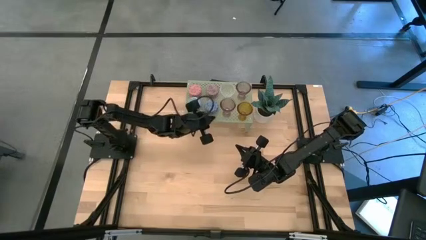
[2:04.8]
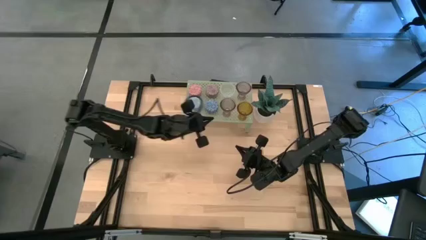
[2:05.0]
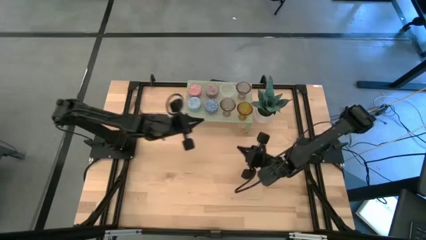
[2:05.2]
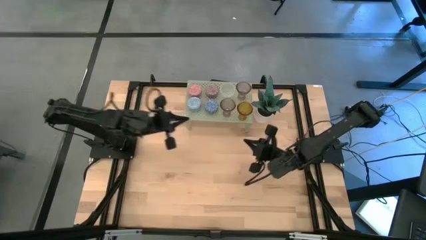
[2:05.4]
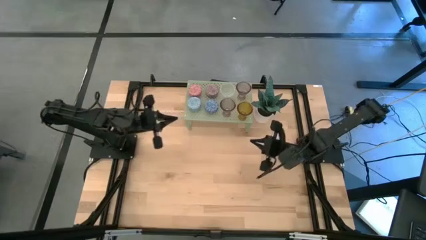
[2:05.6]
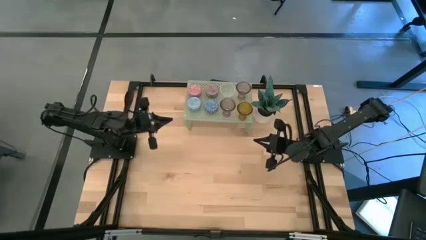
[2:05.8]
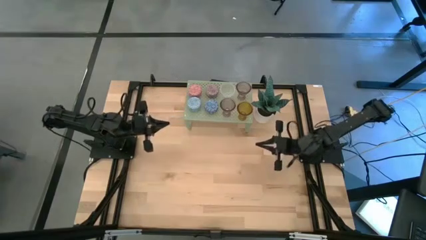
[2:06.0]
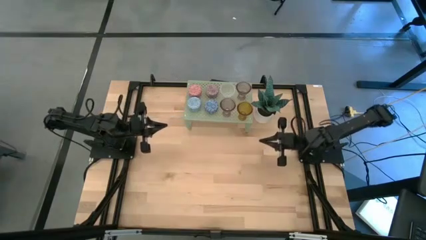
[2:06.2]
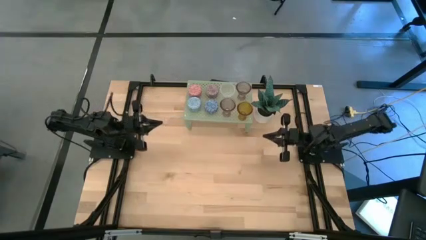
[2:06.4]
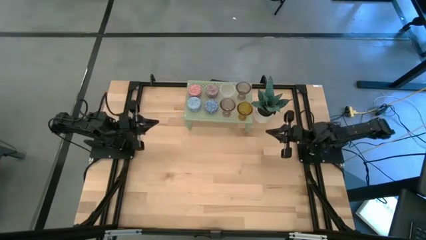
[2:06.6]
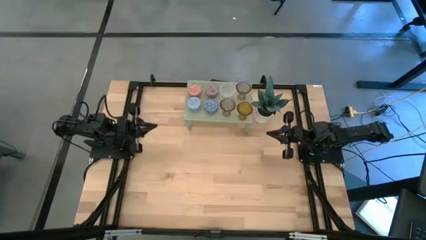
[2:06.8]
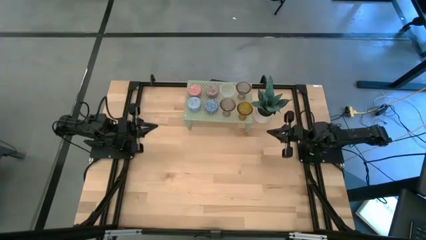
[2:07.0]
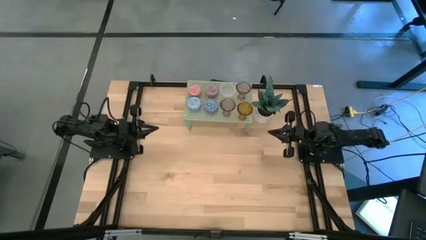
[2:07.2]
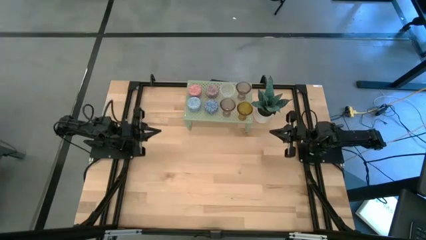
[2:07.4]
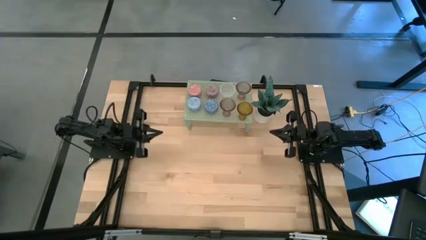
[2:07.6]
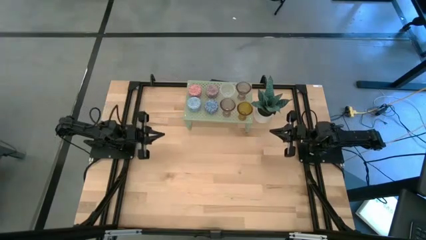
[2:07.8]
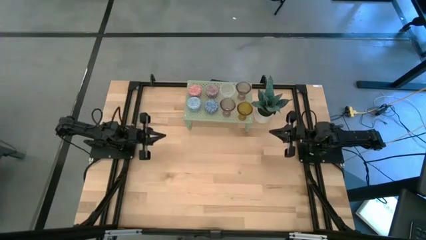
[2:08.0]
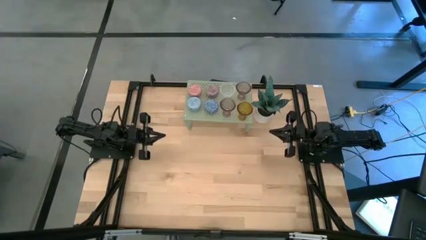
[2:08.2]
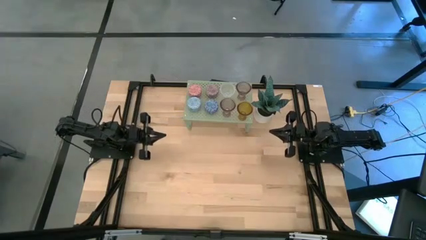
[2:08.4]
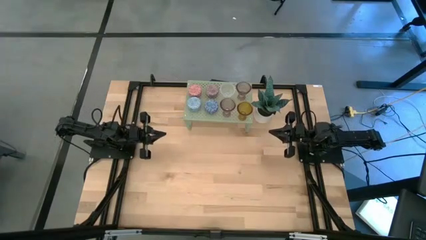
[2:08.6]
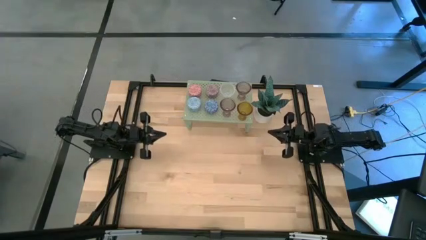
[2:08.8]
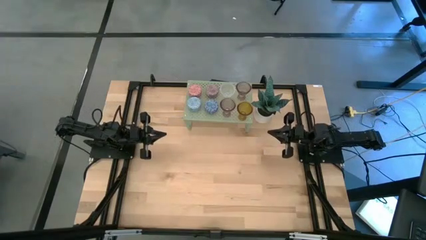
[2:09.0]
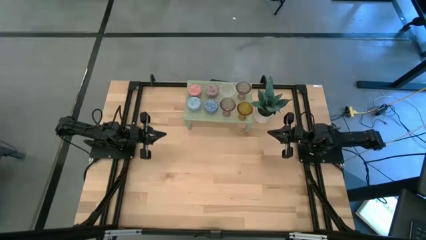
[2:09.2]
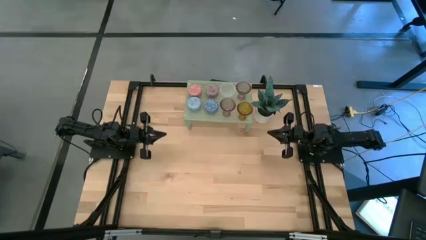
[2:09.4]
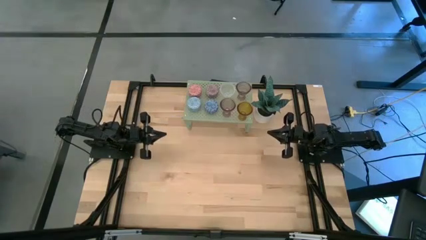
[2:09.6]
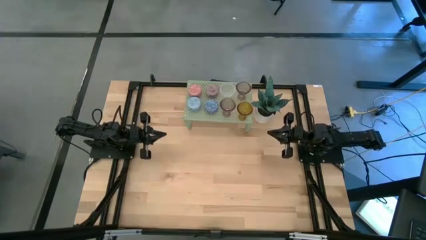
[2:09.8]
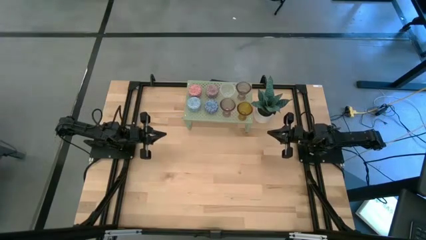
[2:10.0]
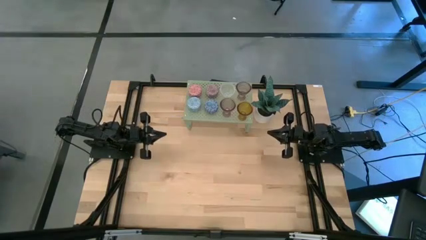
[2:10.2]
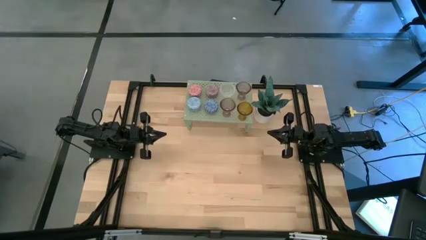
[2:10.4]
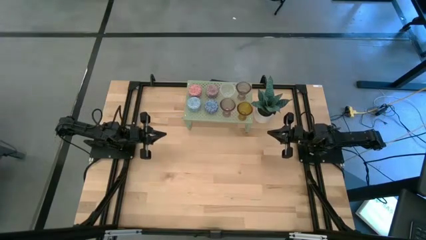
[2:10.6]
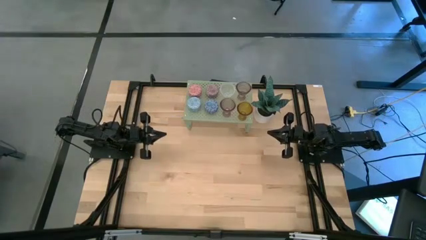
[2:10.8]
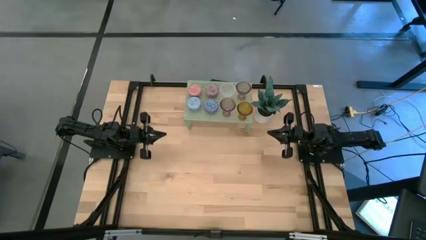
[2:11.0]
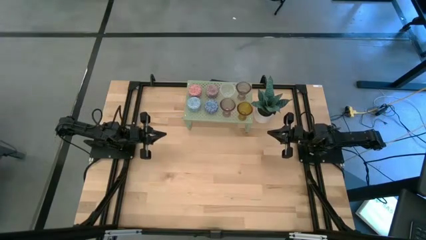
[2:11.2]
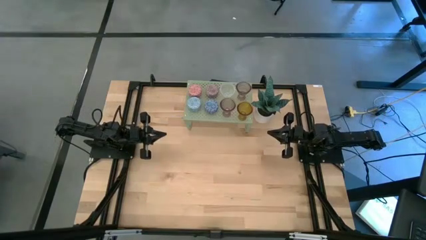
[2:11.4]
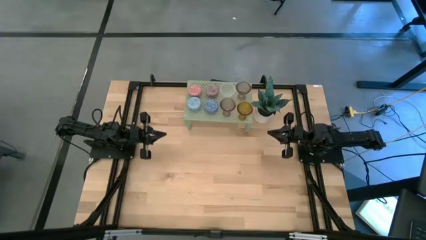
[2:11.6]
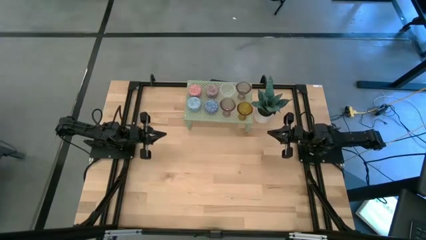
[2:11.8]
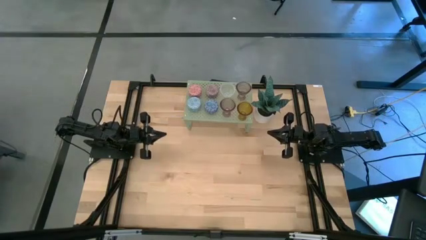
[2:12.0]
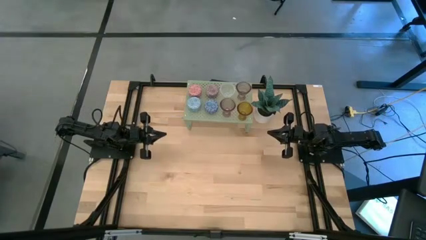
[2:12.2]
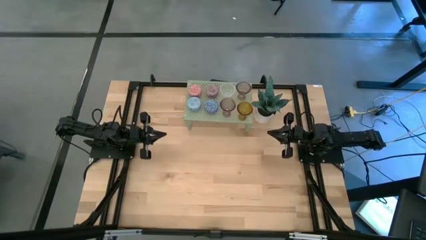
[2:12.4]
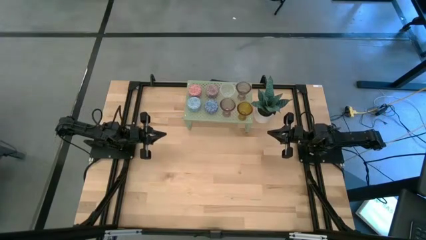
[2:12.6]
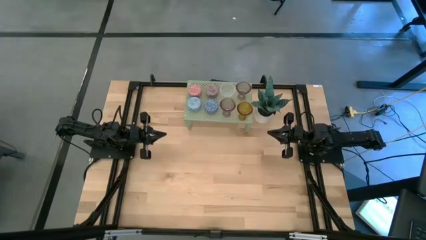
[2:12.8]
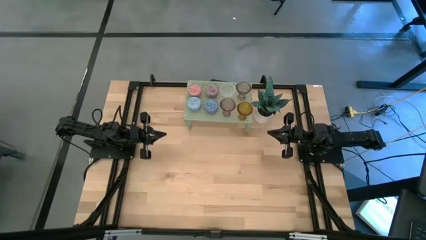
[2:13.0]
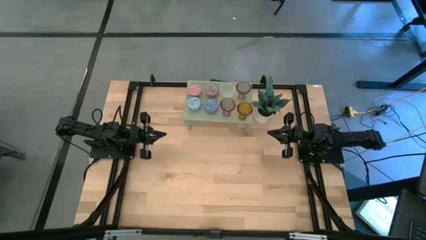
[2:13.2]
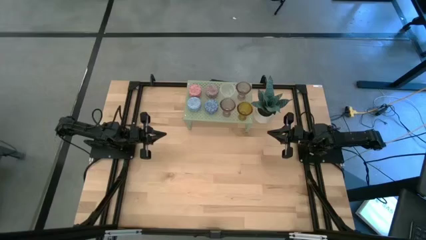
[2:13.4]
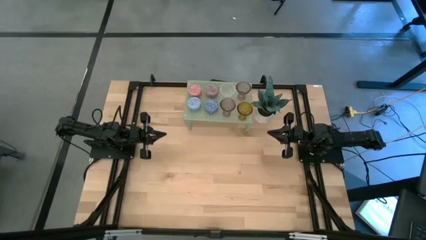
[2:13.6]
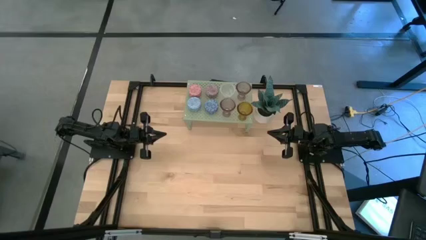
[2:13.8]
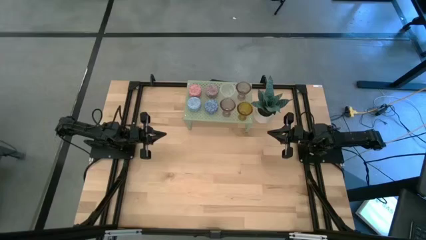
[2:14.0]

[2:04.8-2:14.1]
Task: Pick & Place candle stick holders
Return to Home Position

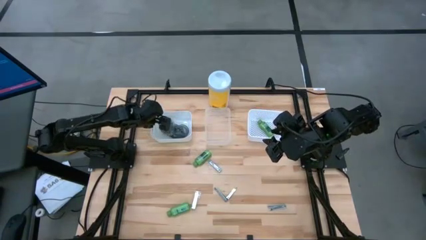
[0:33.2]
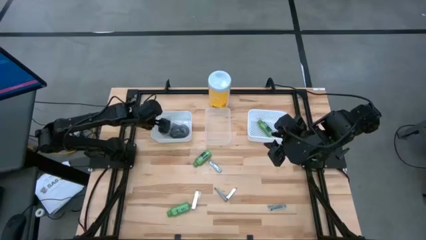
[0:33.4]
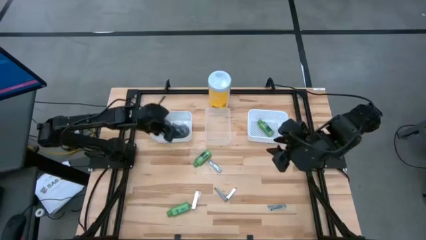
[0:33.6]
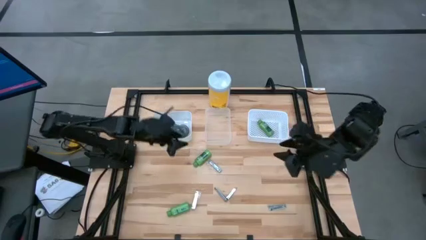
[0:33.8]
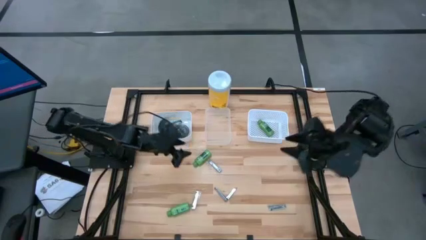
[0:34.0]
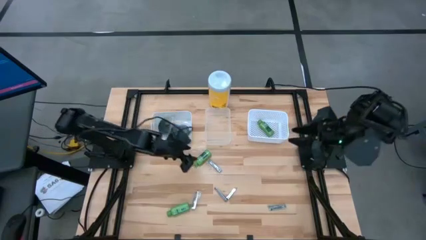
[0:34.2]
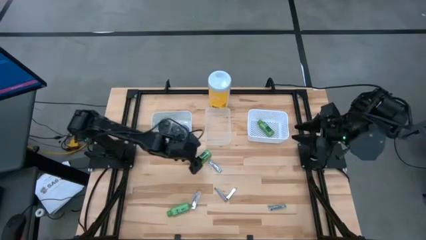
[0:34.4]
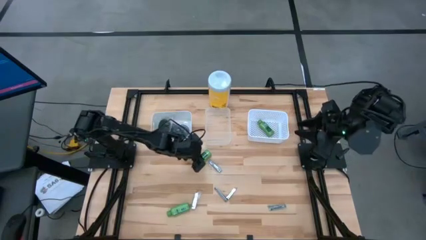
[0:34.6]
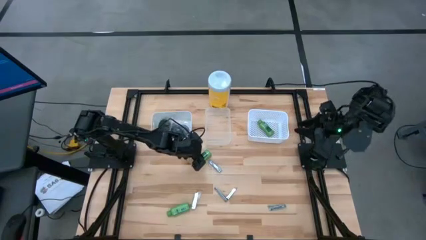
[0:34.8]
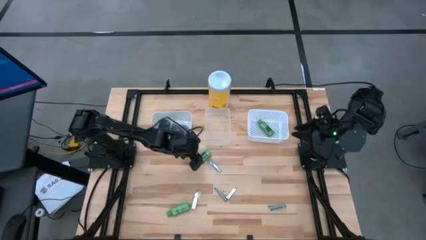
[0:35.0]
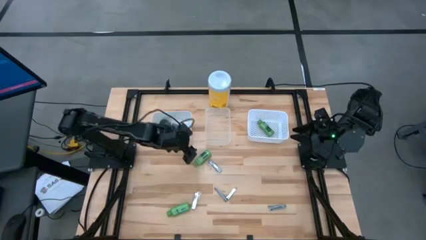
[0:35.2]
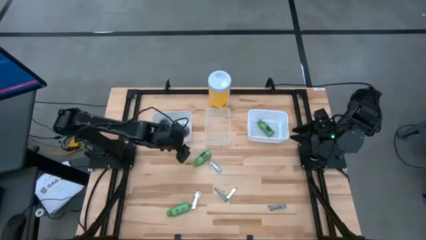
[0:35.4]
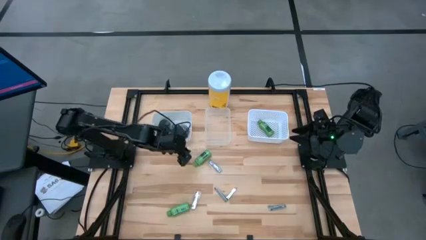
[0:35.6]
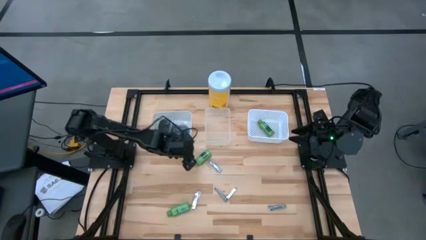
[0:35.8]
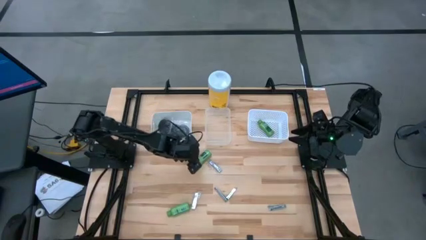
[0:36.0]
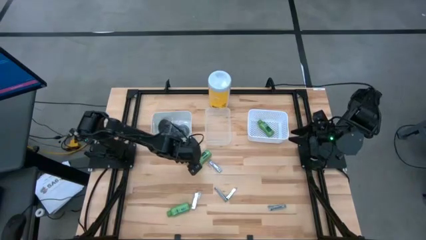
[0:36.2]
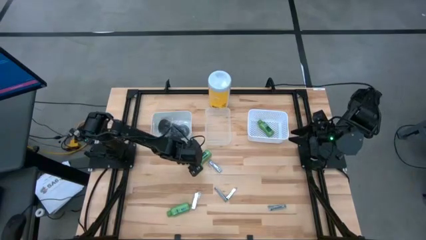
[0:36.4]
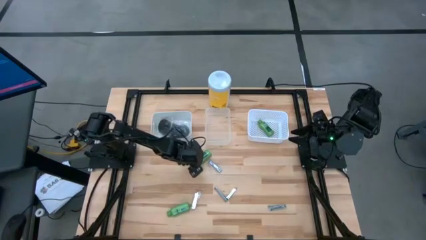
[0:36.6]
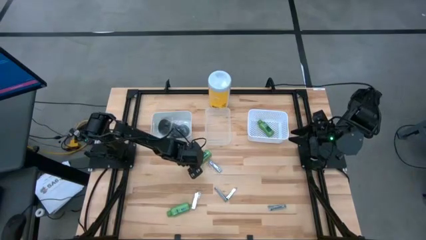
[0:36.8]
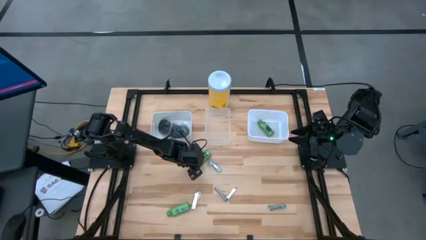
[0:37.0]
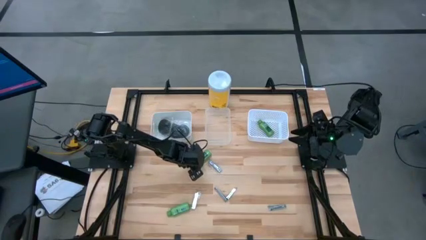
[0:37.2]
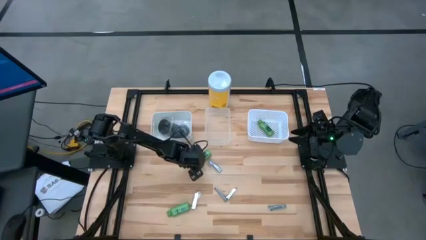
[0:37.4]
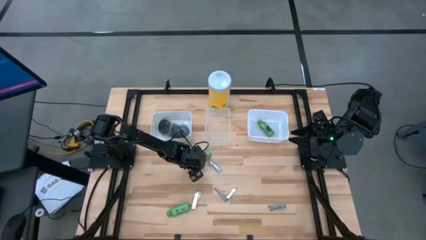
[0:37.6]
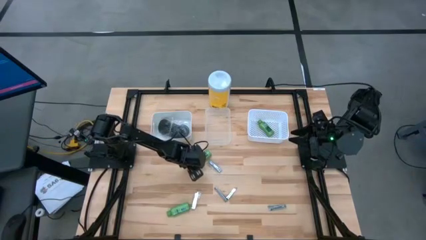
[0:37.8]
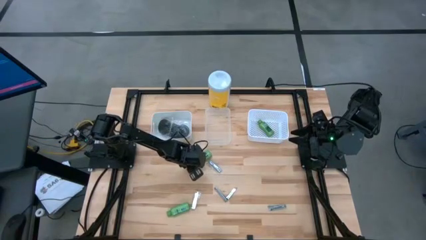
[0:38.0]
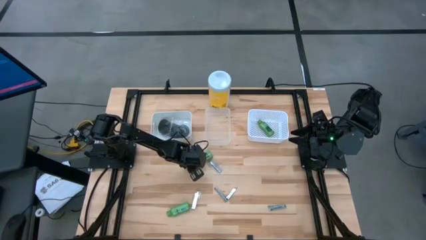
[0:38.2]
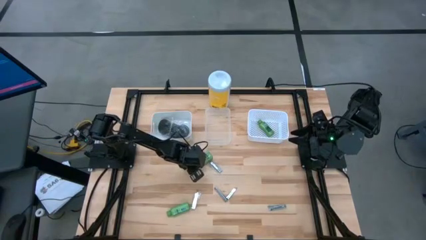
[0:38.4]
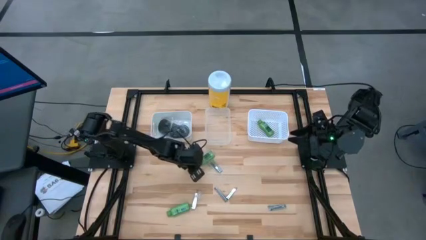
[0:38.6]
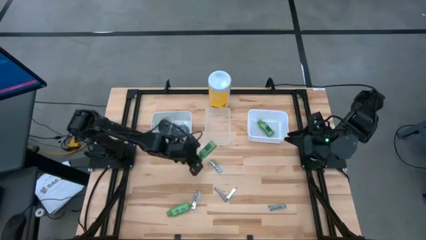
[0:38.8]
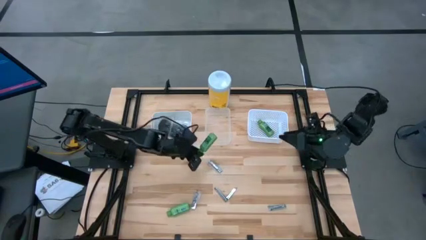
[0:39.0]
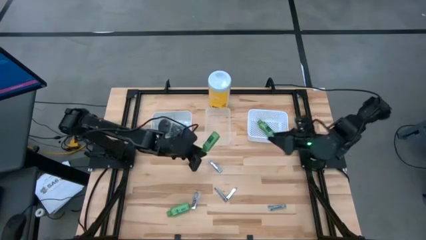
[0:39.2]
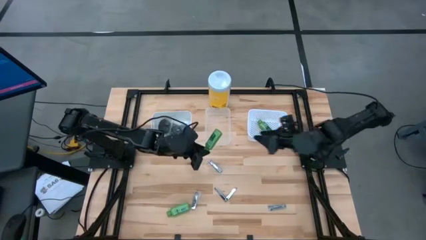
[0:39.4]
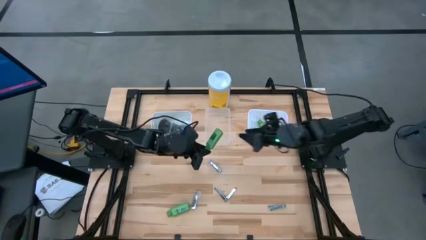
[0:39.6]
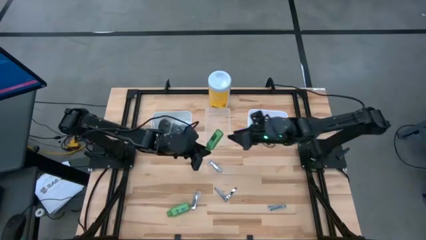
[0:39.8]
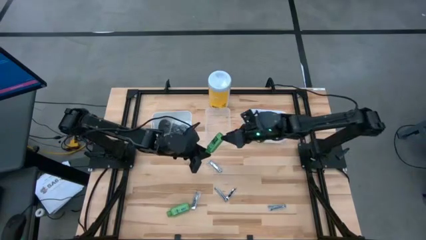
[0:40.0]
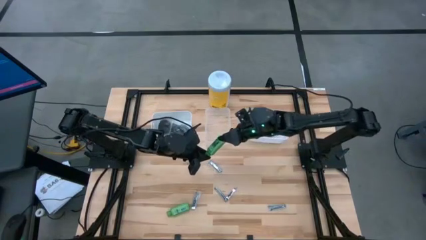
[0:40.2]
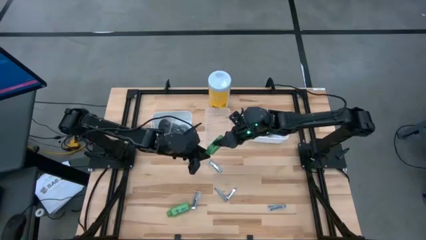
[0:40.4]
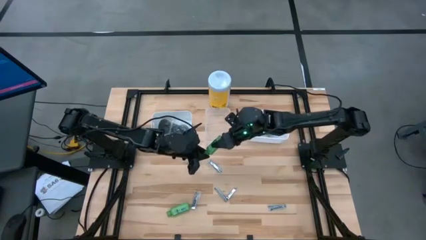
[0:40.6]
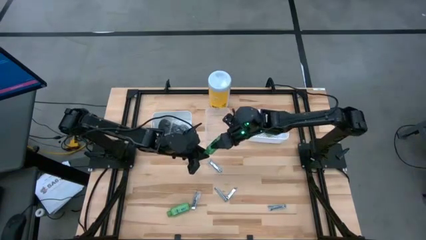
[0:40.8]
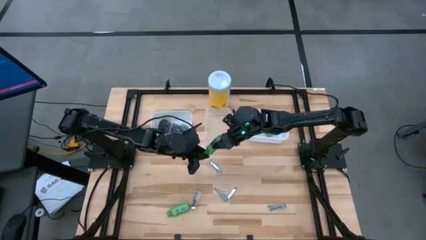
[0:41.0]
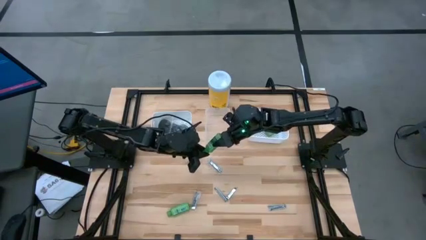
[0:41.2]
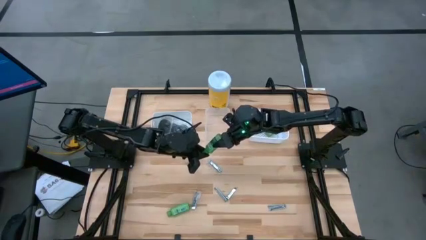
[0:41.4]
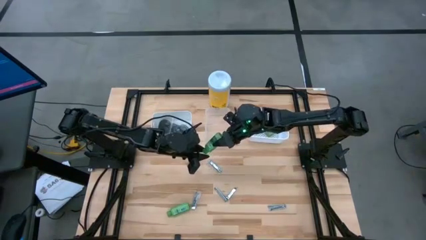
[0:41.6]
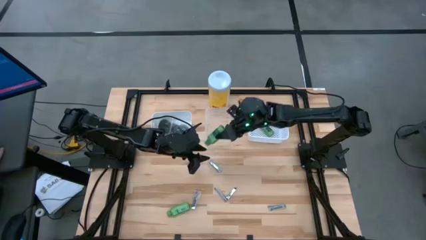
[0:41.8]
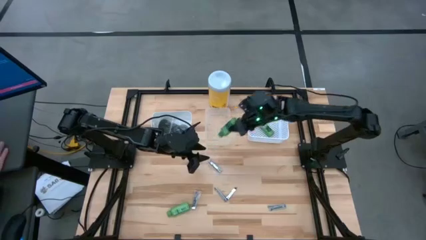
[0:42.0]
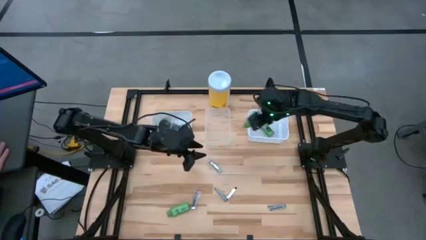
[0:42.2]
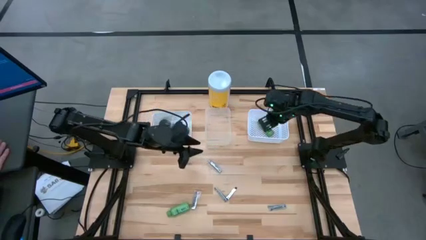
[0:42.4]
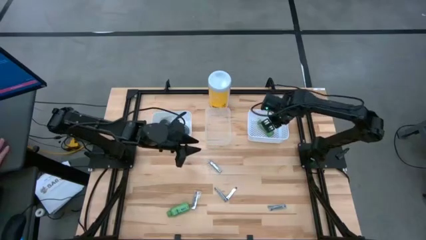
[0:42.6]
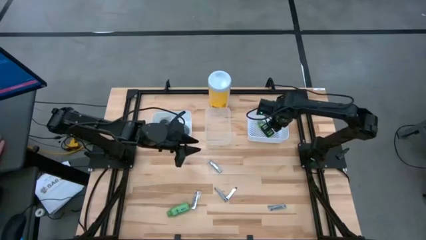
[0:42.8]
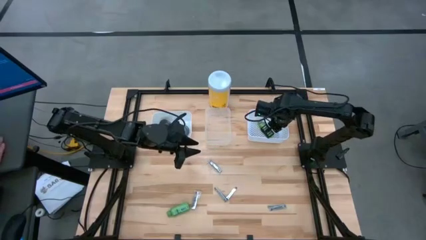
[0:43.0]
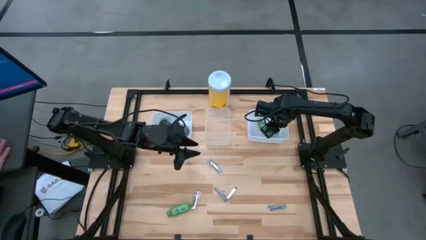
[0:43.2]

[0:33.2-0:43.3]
Task: Pick & Place Travel size toiletries
Put the green shampoo into the right white bin
